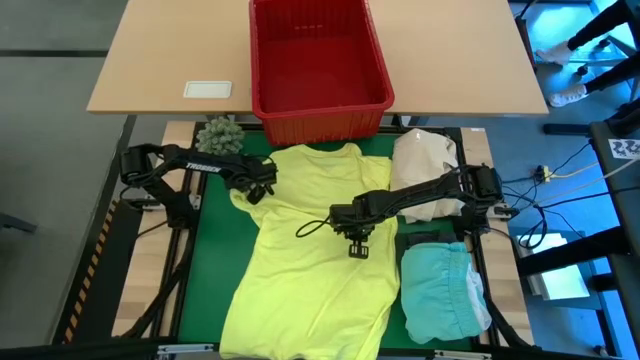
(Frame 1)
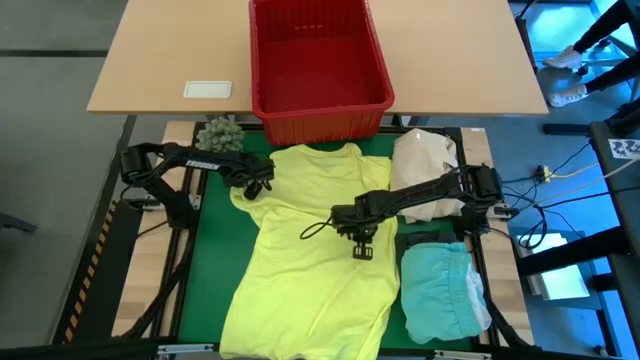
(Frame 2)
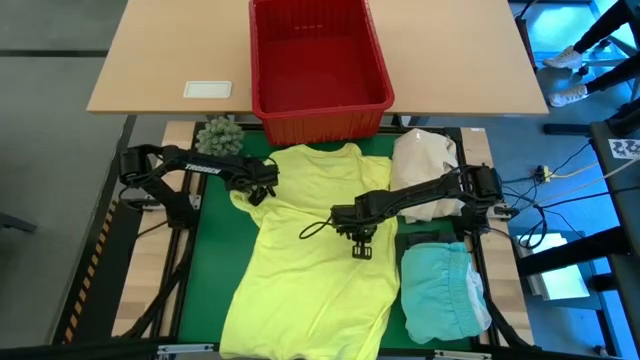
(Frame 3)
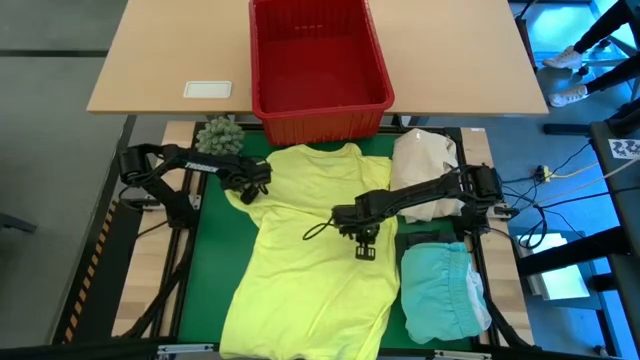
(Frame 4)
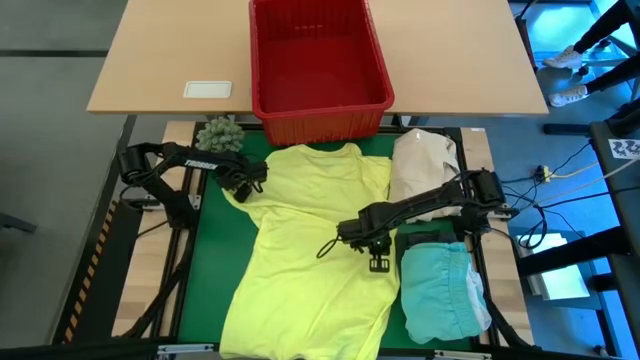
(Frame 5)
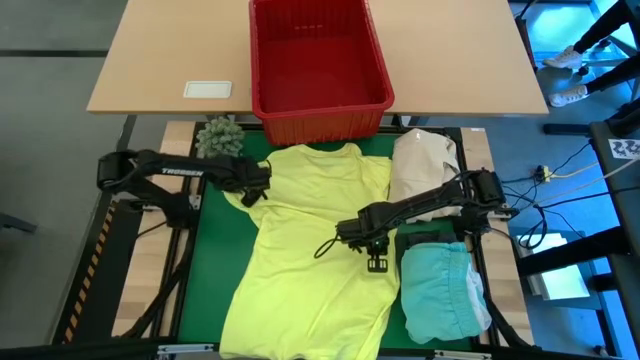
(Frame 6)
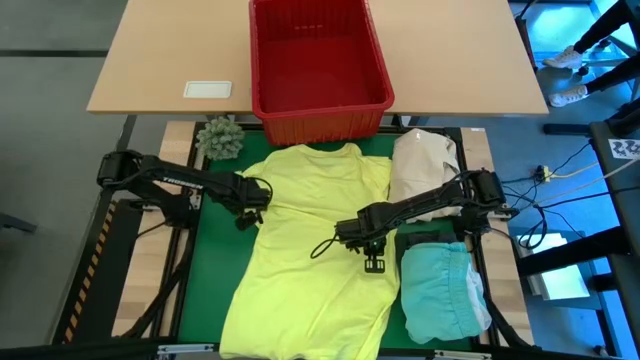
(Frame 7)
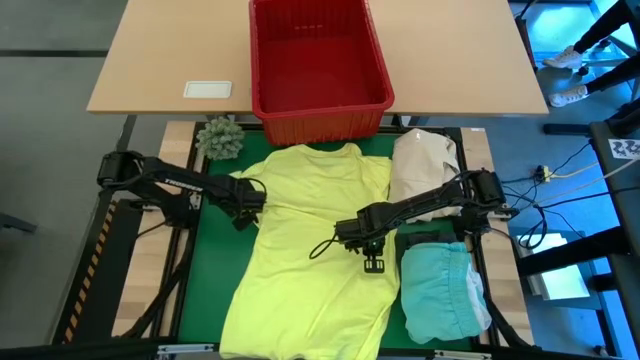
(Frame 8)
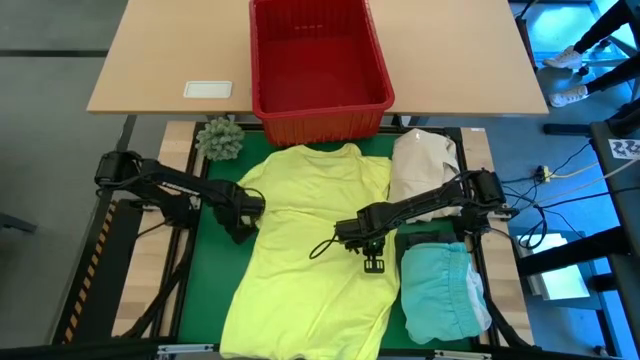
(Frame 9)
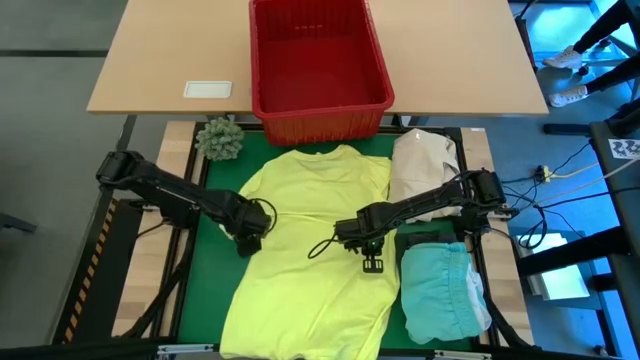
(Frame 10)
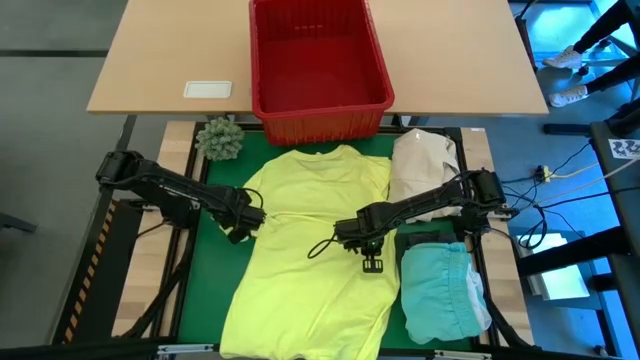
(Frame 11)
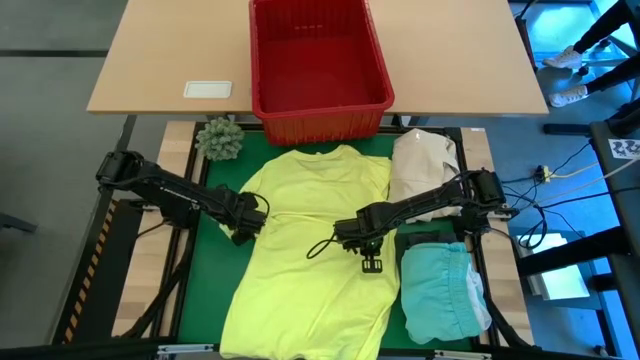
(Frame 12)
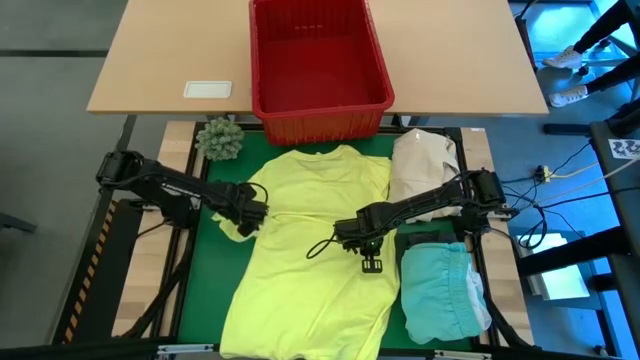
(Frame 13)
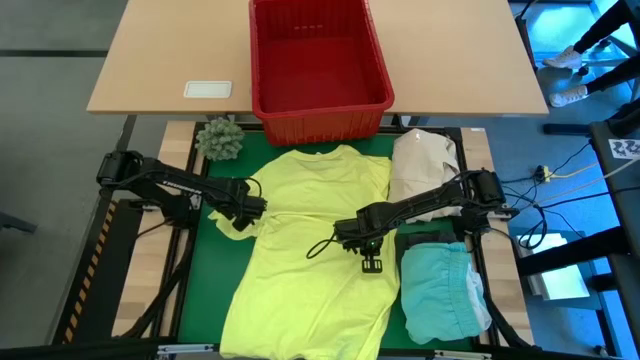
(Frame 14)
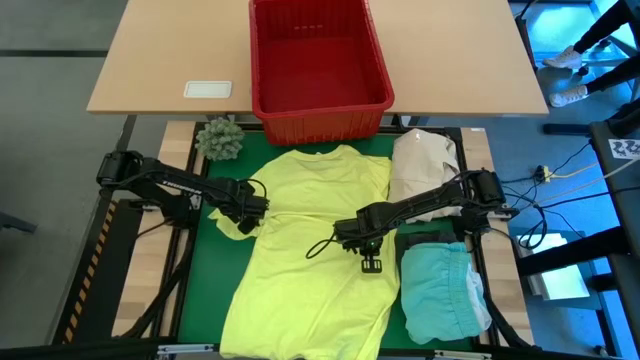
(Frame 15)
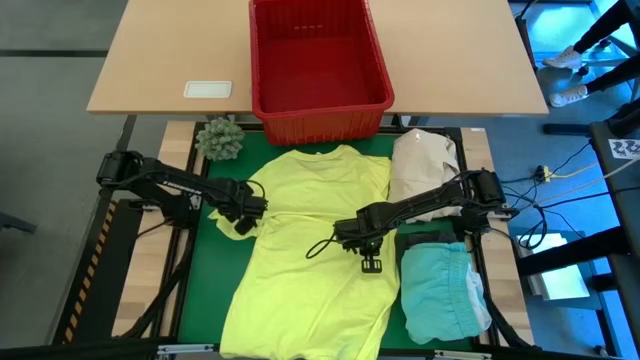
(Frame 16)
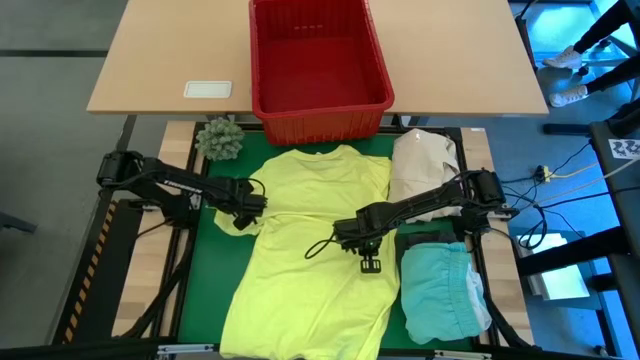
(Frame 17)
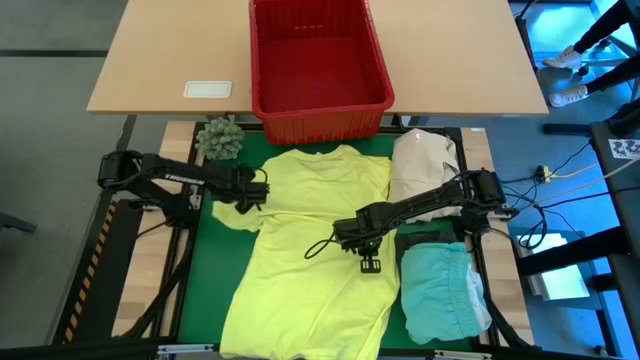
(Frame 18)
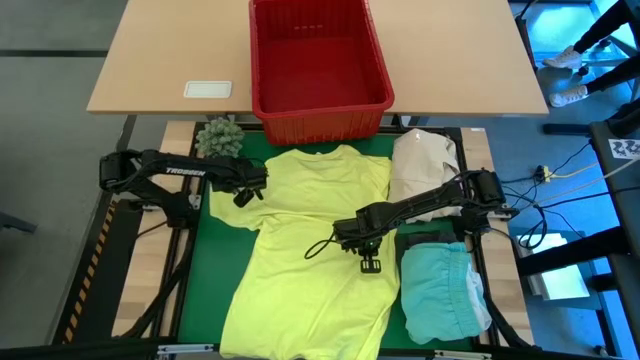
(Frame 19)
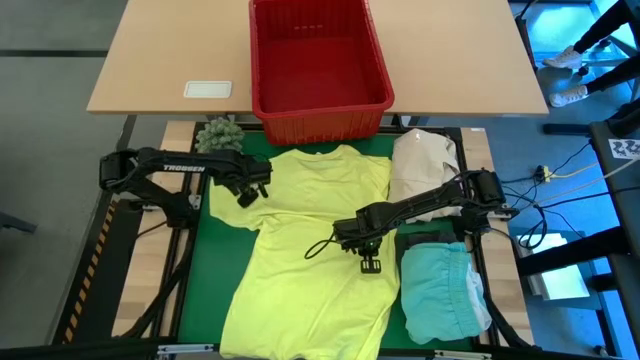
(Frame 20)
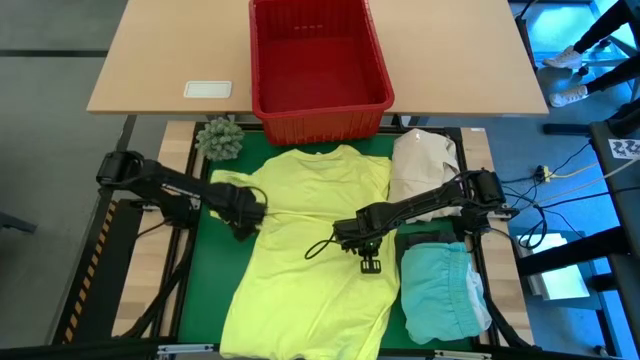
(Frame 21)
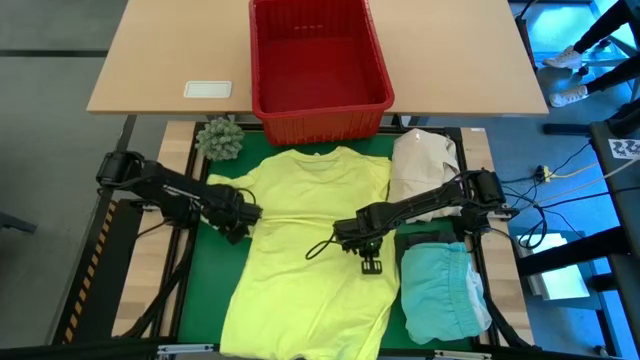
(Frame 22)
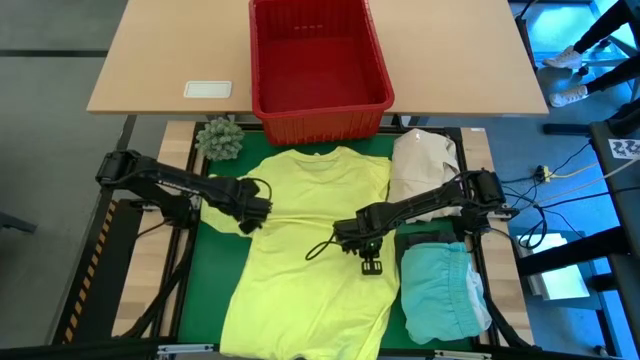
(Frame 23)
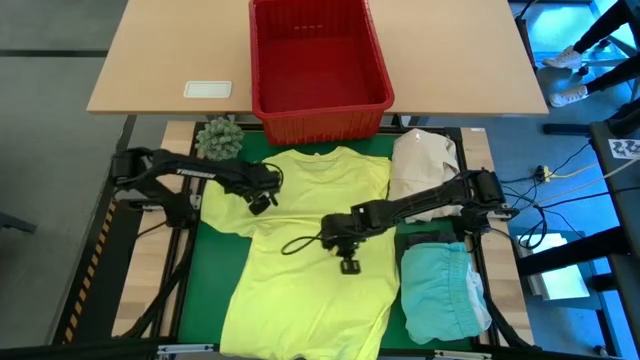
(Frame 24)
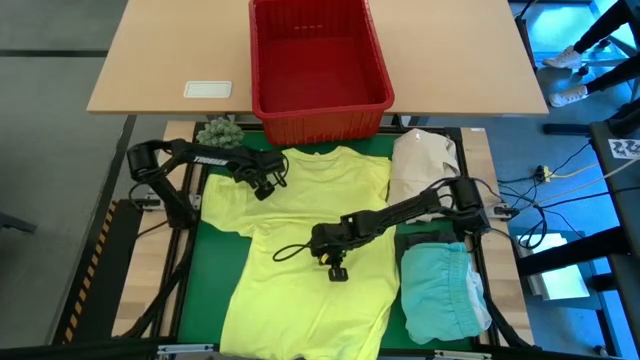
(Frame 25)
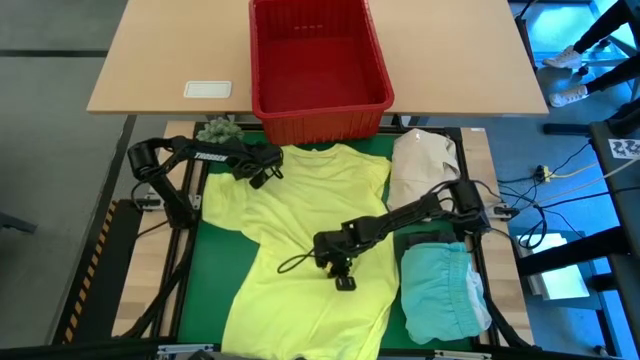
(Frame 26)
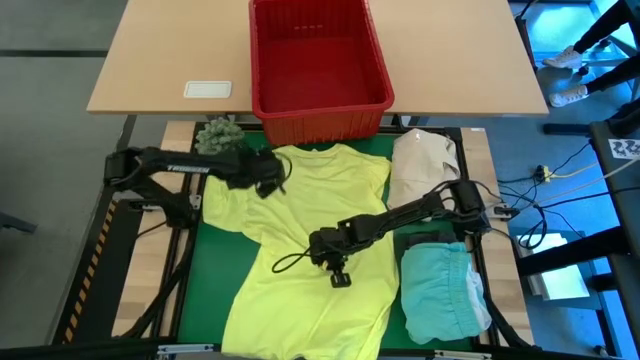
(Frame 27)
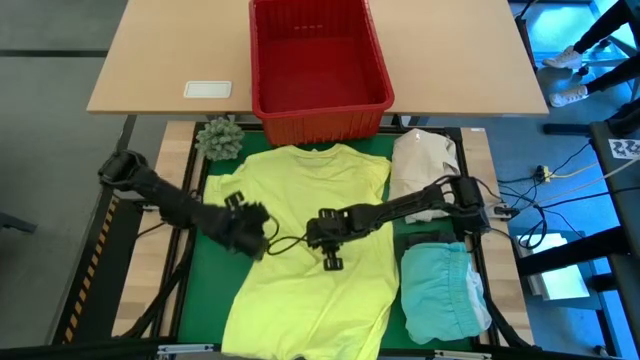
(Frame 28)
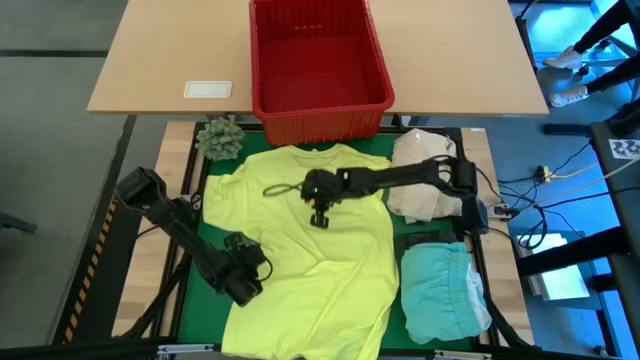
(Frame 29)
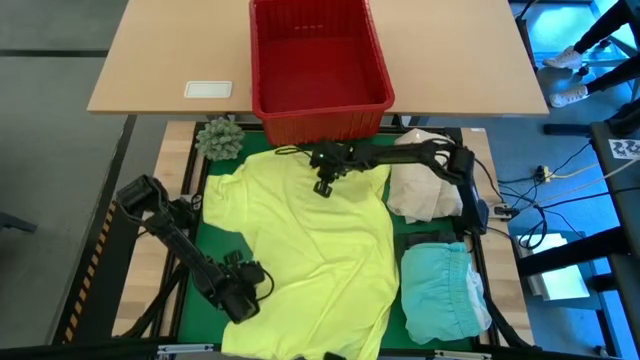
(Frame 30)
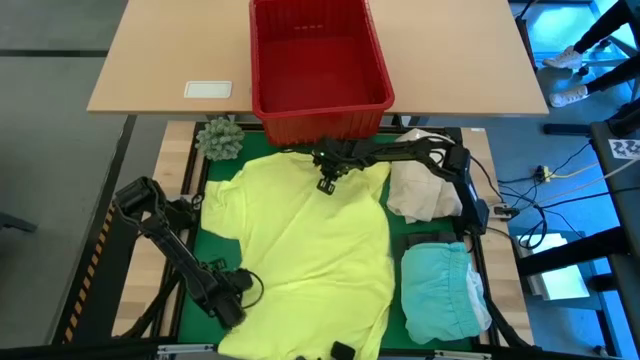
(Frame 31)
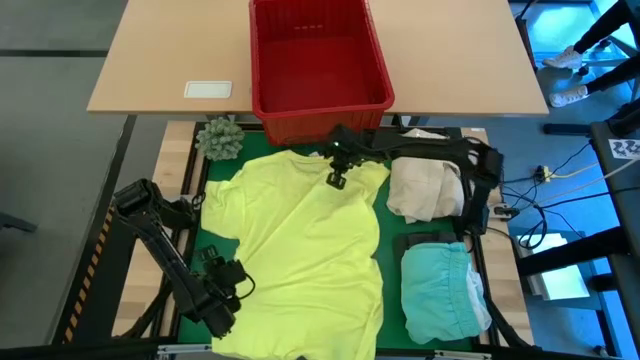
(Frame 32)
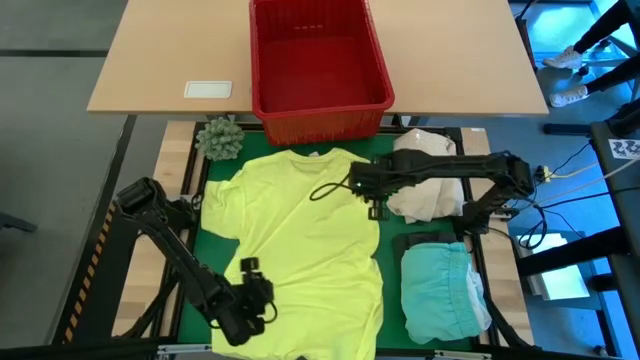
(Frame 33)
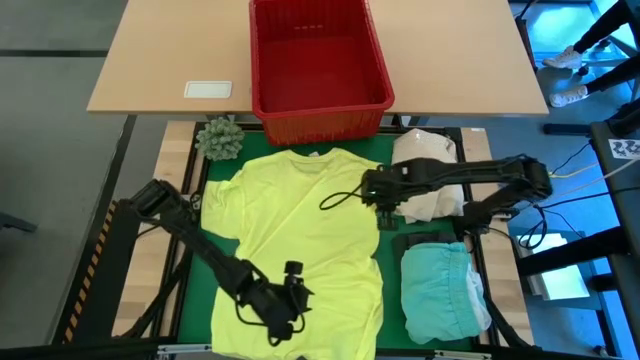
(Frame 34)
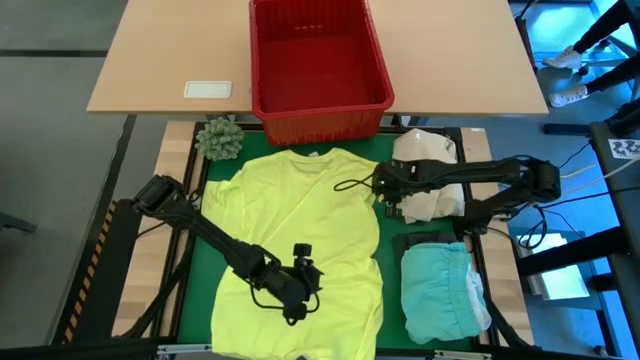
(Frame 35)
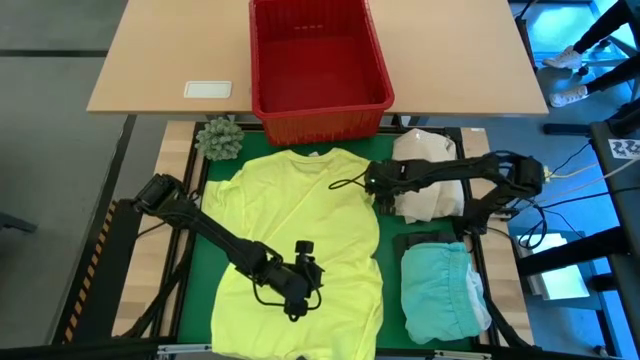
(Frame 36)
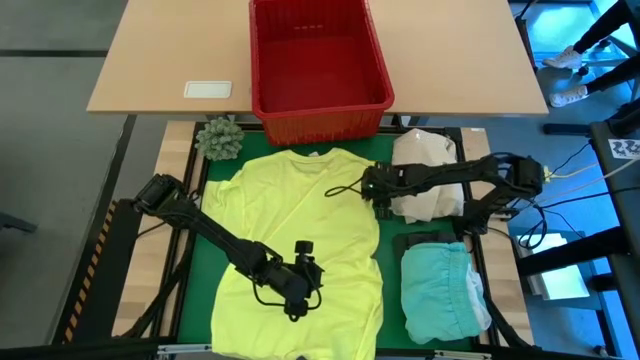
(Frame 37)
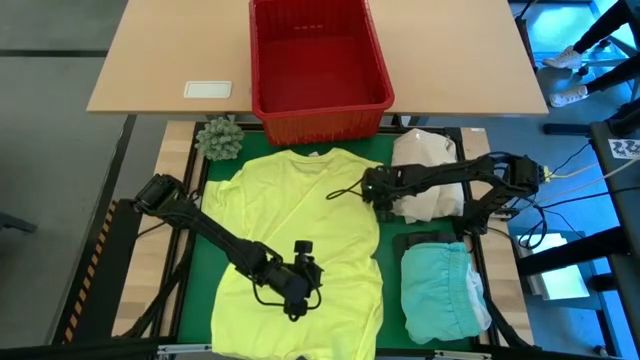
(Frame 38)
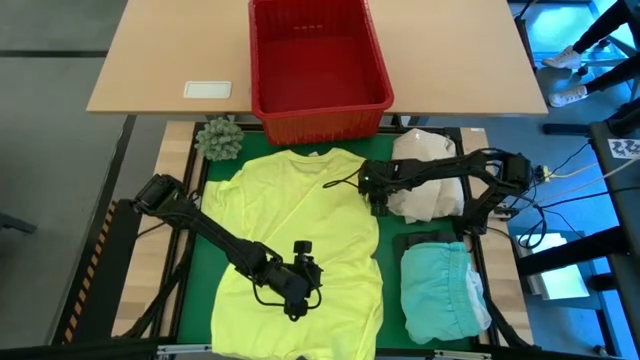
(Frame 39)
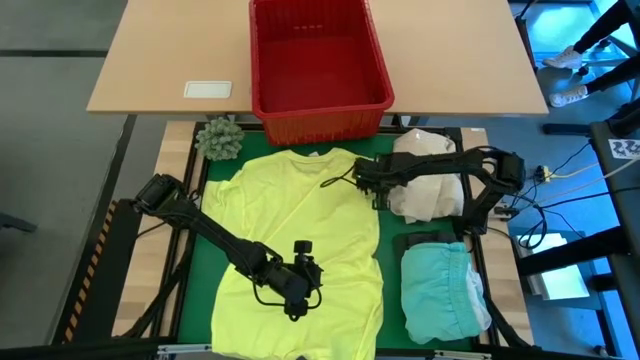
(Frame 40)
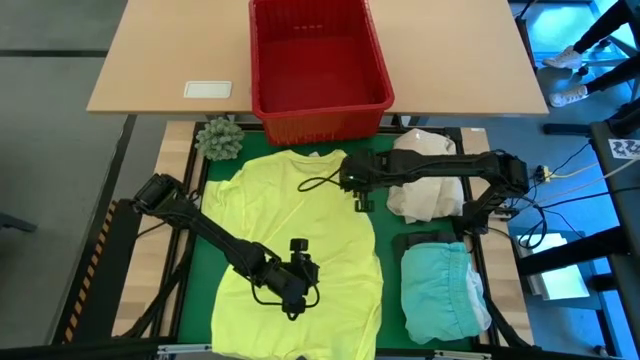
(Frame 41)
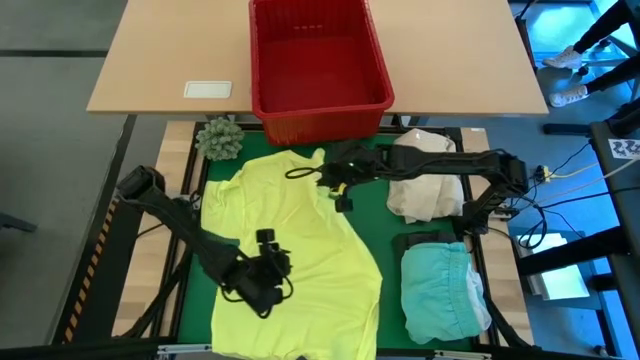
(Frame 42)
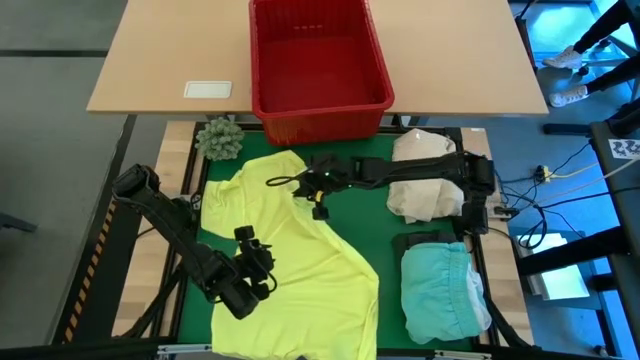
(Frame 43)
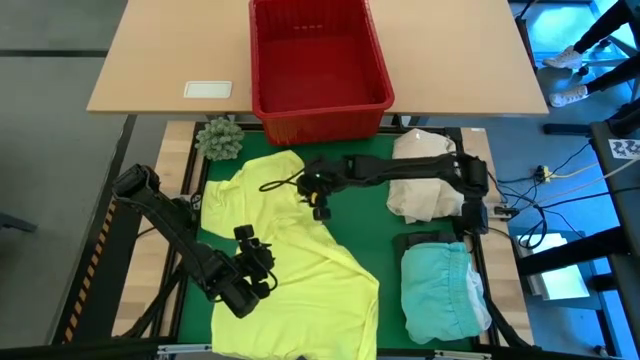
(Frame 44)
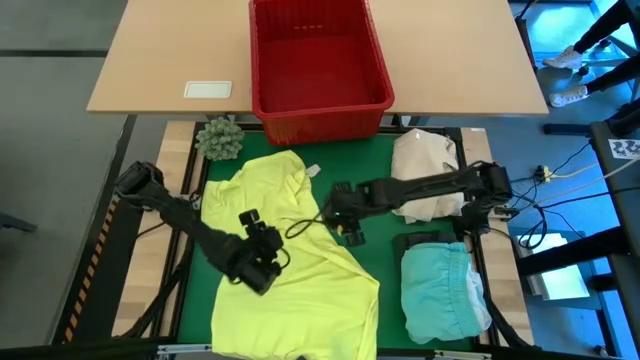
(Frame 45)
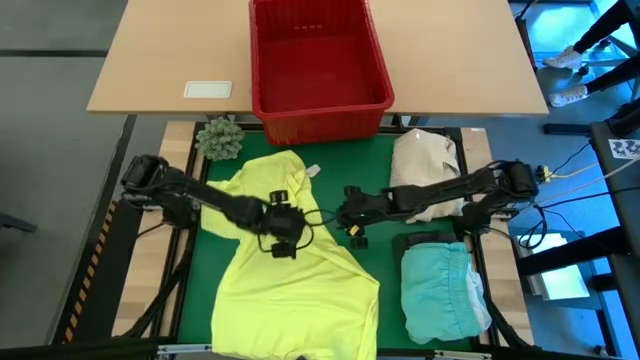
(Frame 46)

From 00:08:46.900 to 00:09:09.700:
Task: Fold Laundry from Bin
Fold the yellow shirt
